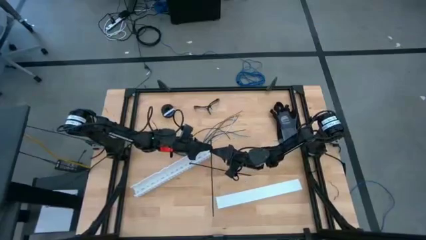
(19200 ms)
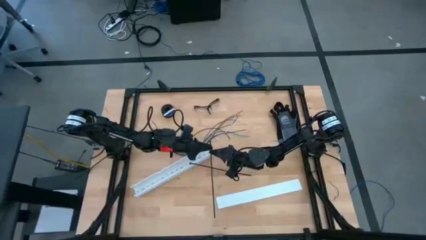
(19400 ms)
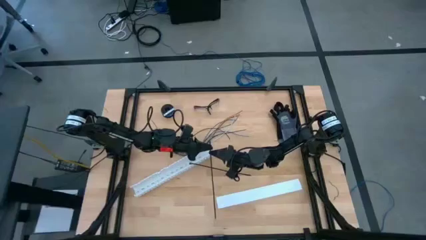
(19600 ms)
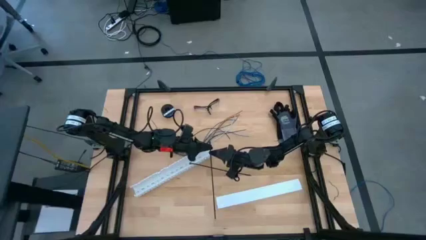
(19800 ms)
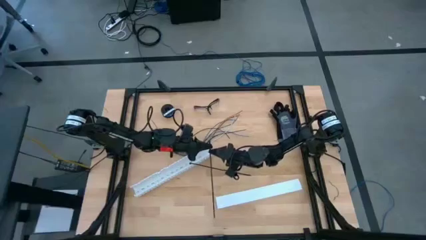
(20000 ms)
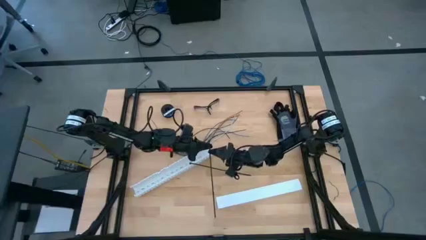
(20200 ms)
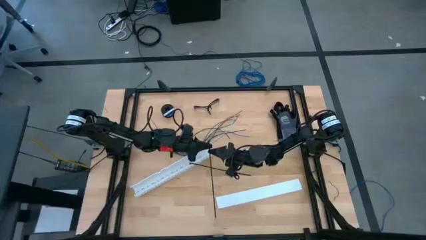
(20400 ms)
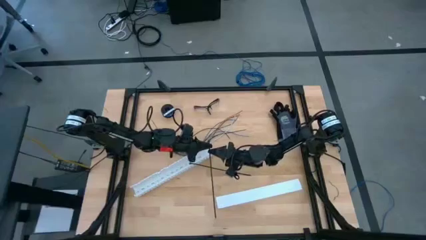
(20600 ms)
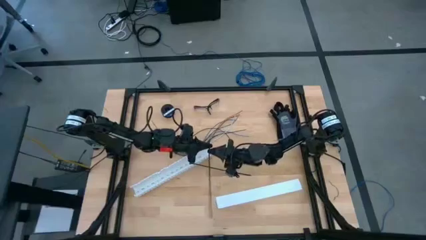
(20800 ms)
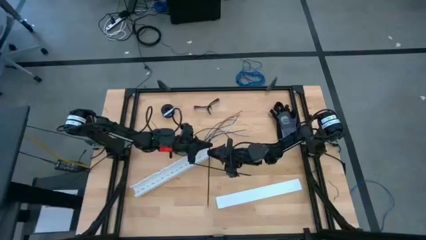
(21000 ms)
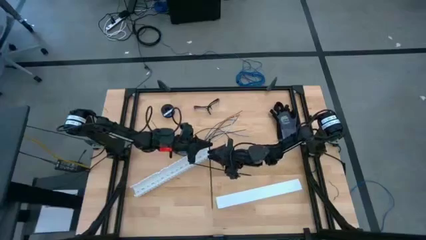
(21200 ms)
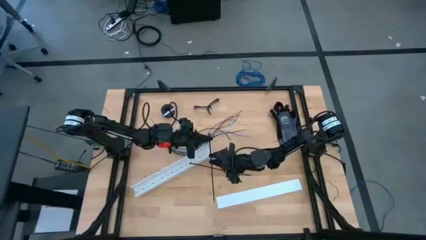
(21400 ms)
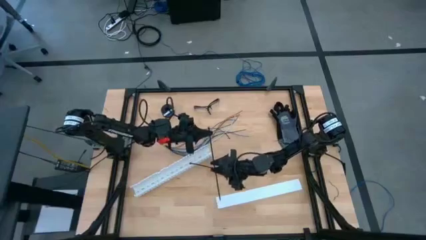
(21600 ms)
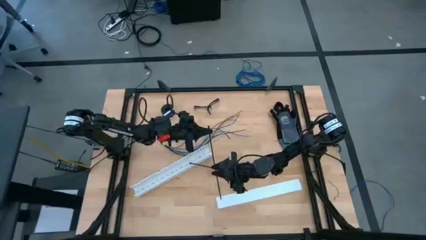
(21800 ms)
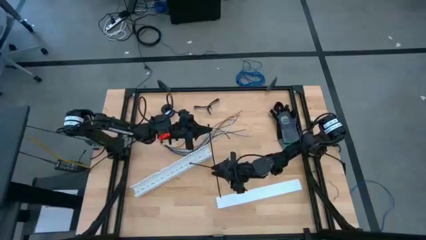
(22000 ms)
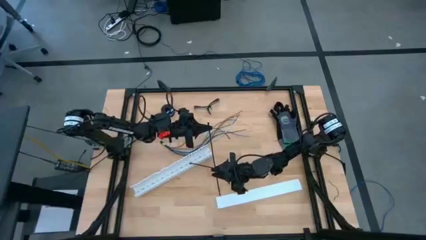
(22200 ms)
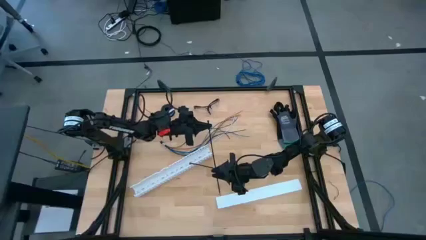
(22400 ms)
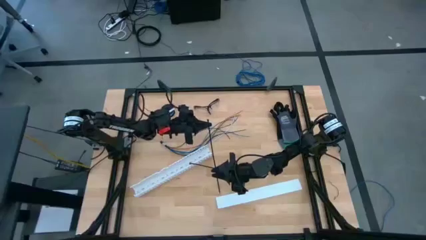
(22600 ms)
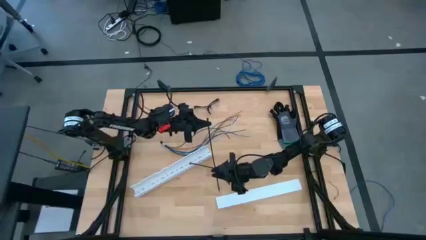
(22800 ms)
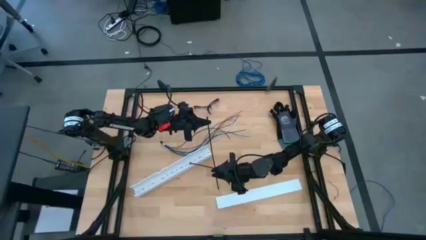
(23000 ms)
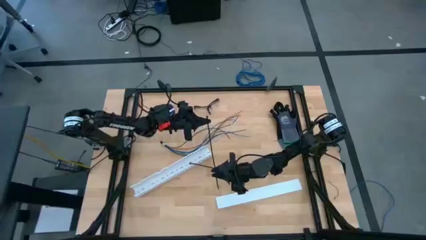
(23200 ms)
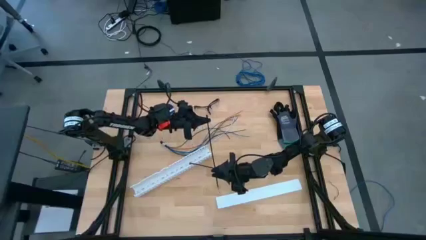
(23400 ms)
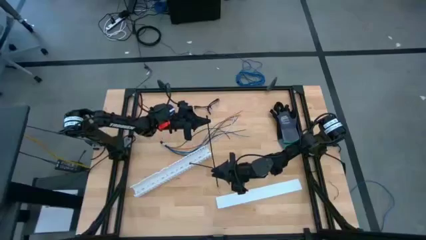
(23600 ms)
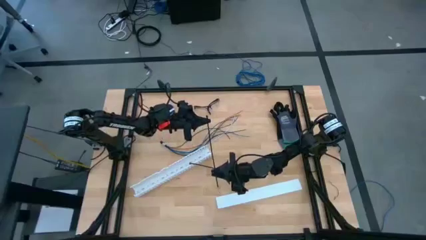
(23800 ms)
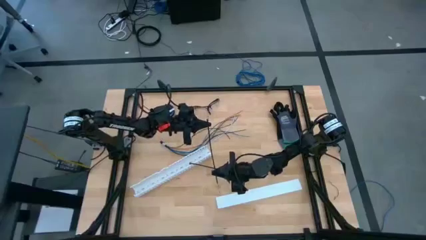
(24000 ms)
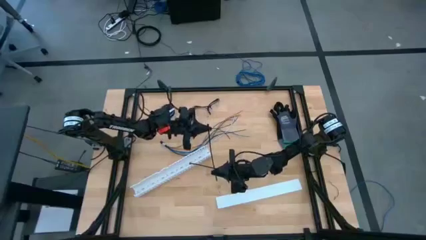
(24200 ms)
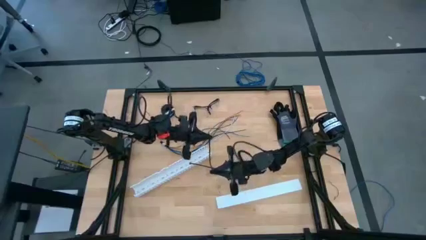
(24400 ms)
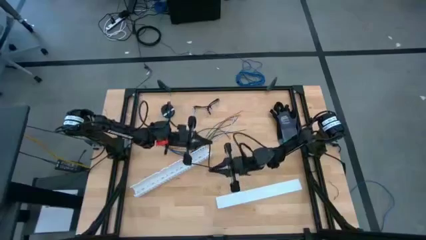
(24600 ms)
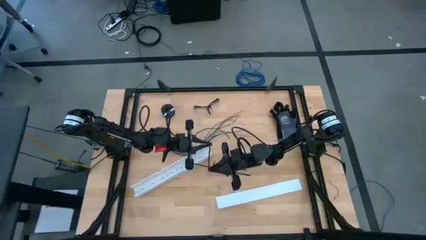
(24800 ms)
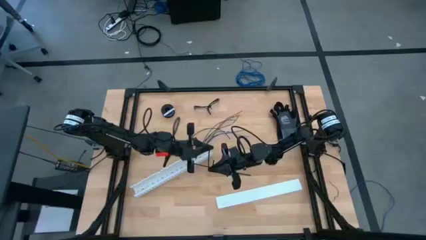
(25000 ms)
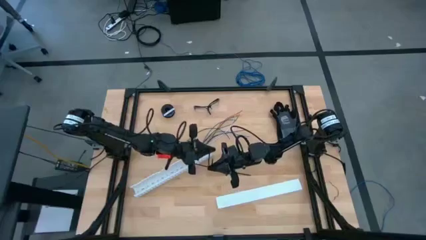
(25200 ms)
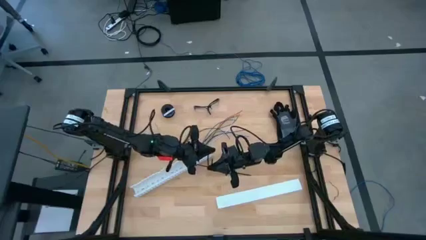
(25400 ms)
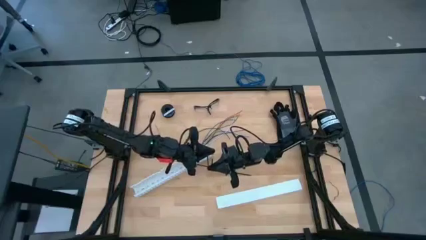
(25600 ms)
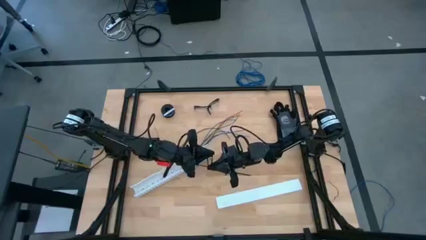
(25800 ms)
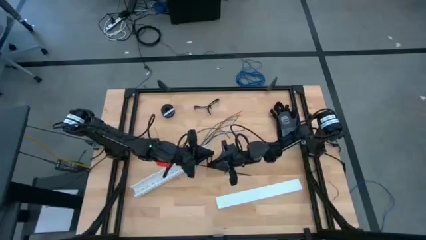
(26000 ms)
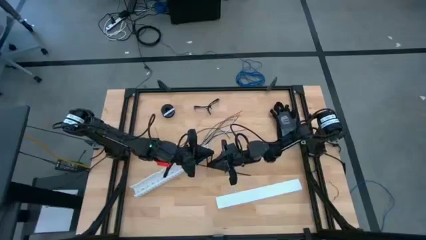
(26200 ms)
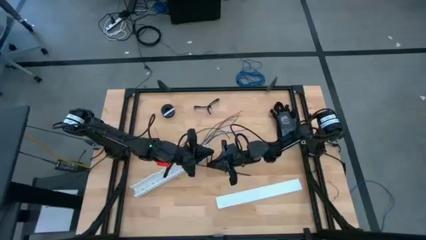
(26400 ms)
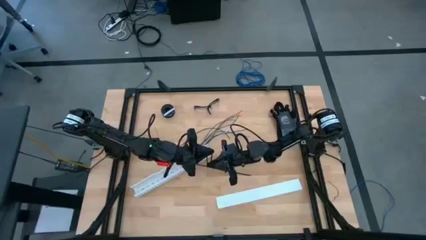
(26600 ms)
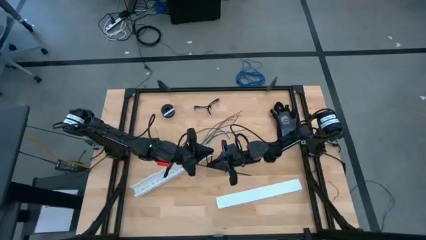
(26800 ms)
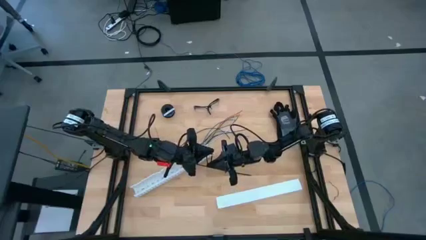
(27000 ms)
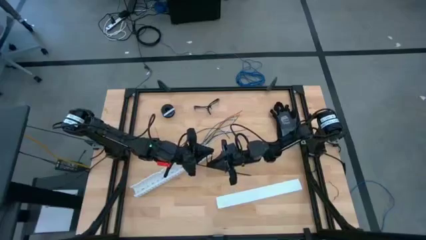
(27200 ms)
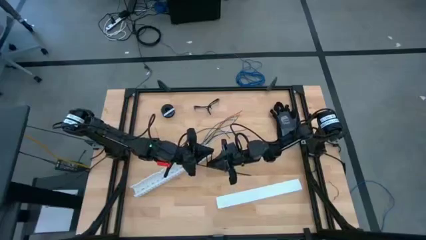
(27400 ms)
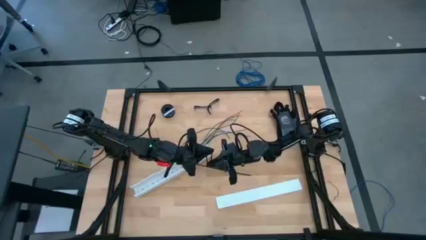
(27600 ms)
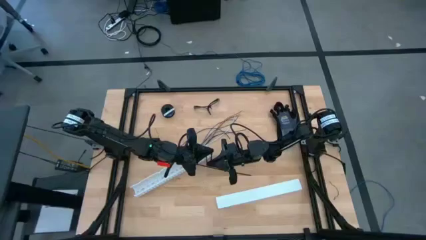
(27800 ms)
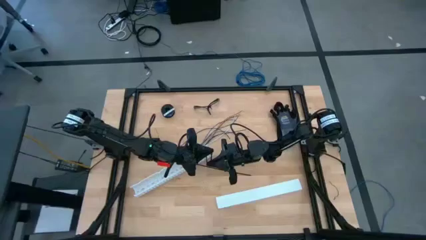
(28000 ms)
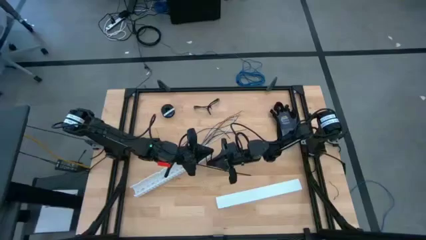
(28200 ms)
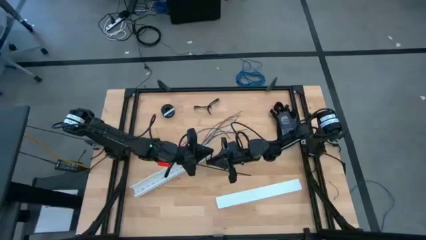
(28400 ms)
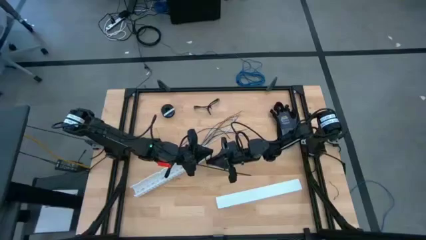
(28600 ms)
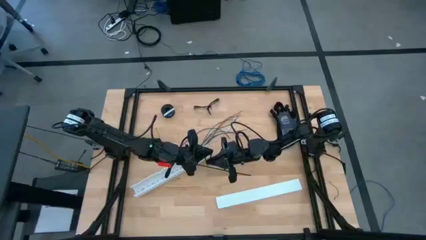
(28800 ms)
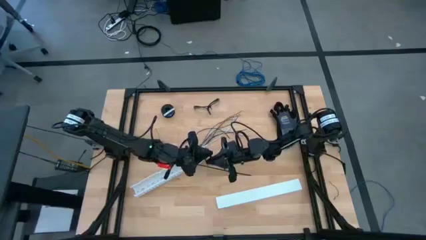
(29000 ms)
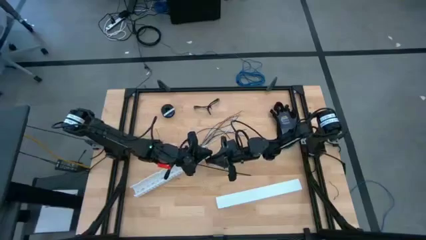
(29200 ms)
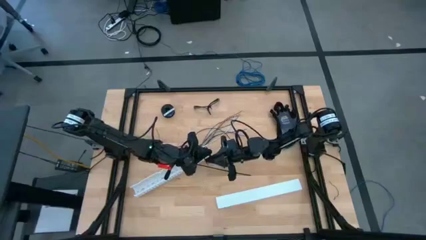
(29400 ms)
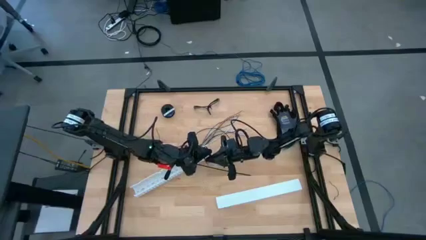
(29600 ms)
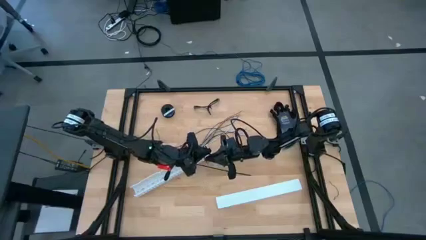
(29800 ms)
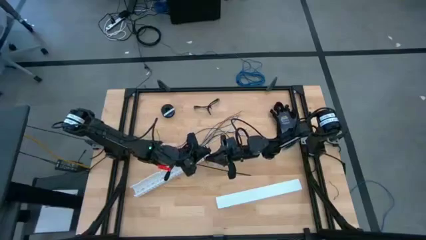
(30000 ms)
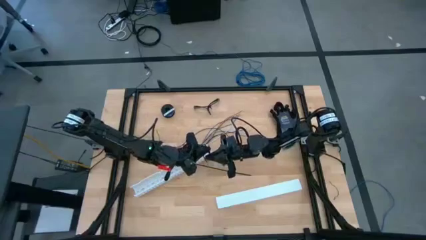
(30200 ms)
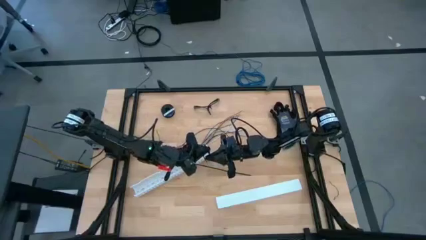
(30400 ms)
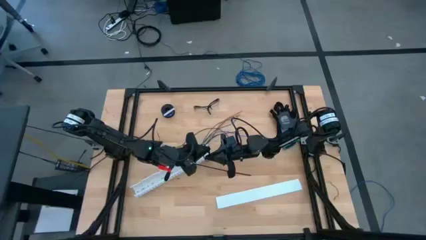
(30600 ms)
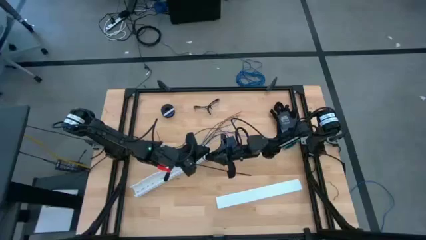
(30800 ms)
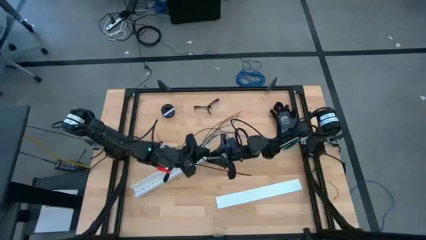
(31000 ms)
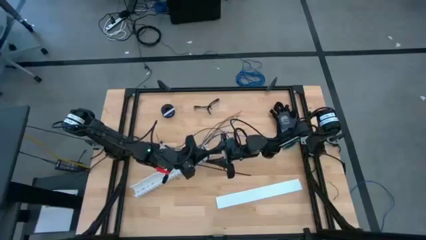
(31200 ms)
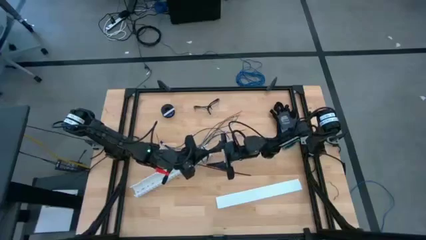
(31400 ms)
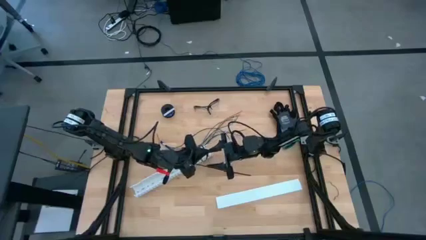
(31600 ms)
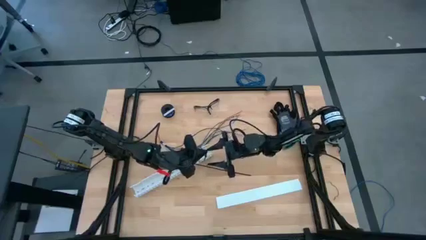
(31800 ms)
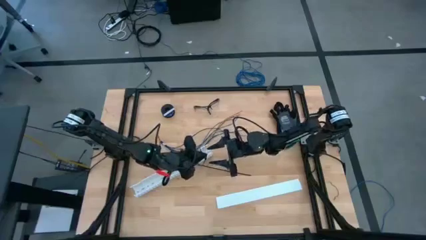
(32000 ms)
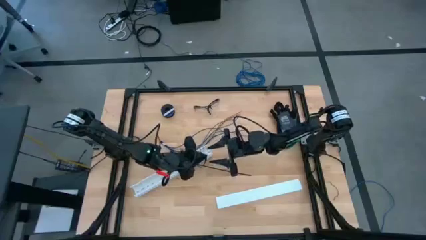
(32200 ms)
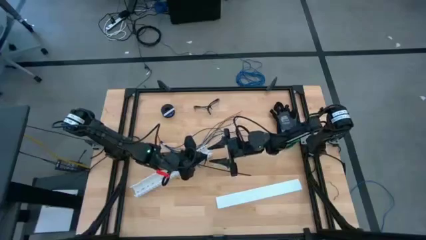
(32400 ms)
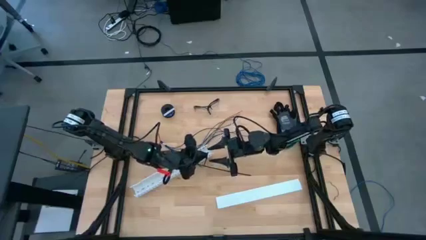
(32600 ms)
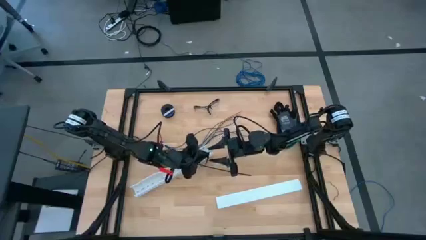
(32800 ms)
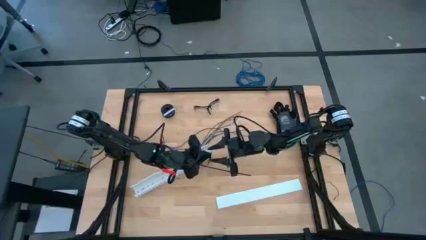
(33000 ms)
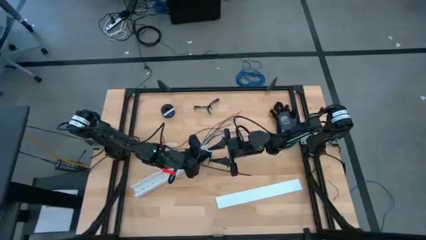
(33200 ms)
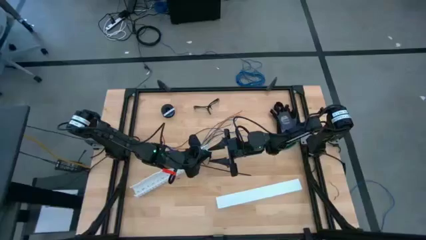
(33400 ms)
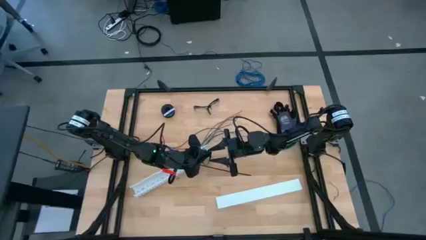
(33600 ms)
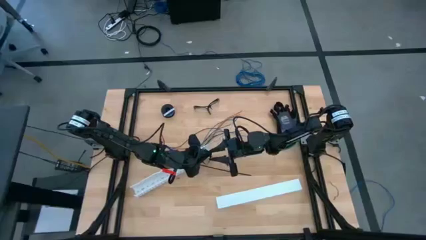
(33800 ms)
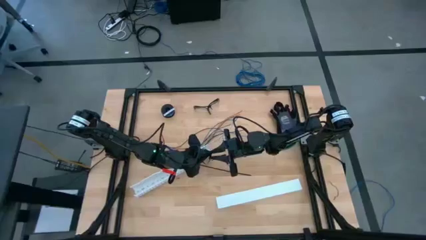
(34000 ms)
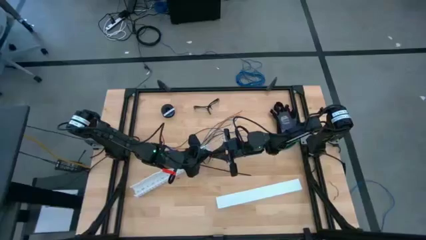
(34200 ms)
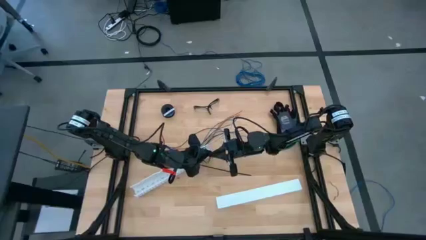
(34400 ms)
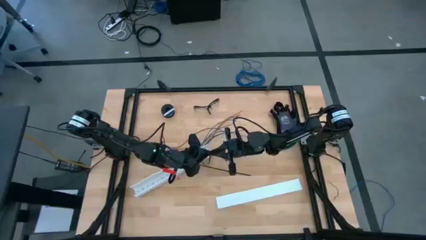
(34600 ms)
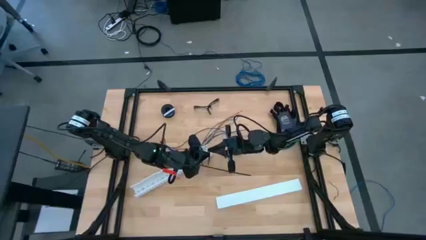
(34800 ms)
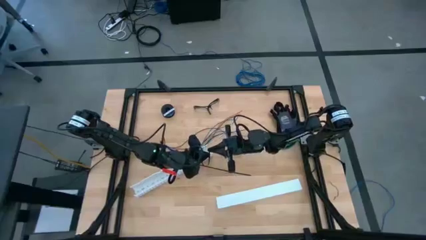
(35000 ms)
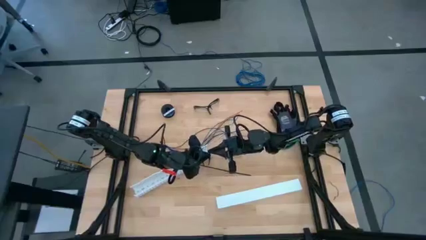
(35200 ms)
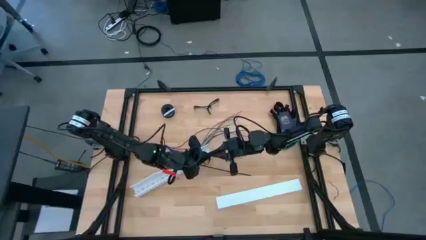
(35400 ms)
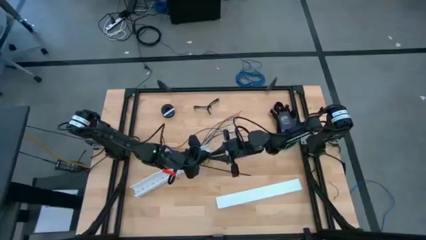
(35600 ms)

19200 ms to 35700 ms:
Task: Ziptie cables
Insert the black zip tie into the locking head
